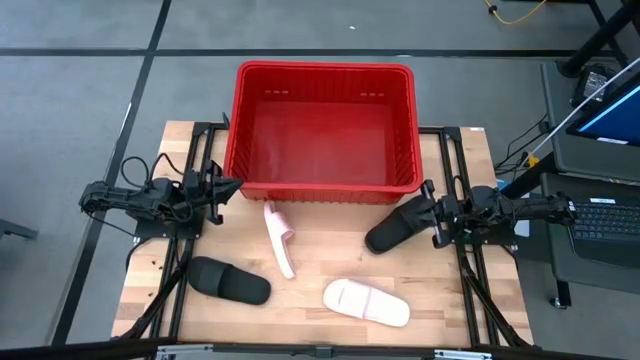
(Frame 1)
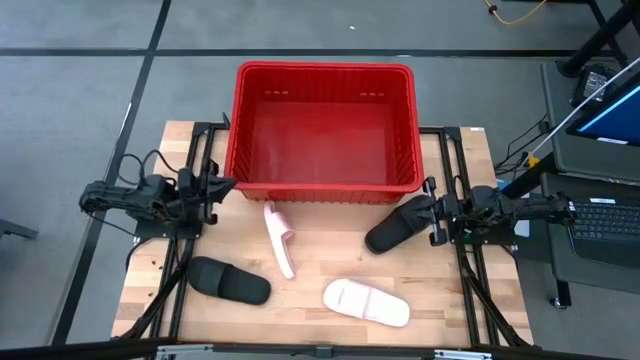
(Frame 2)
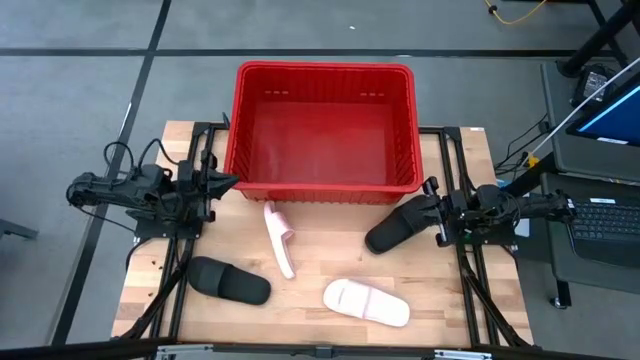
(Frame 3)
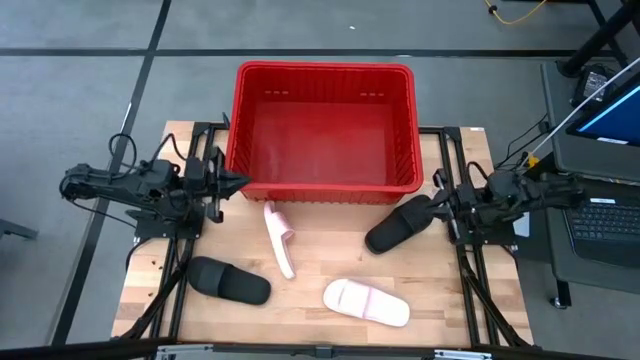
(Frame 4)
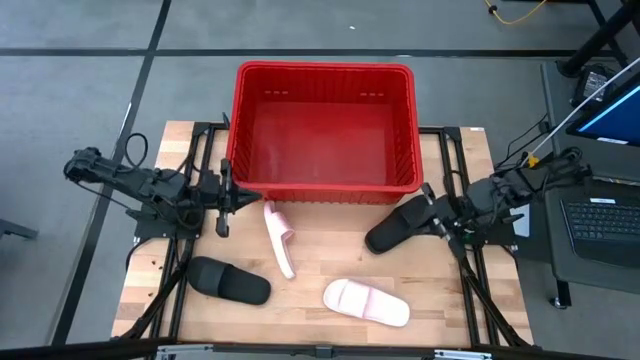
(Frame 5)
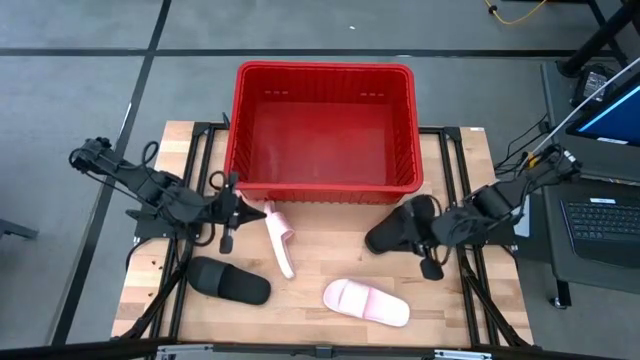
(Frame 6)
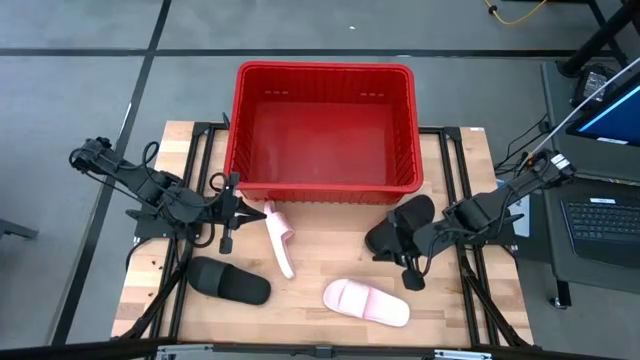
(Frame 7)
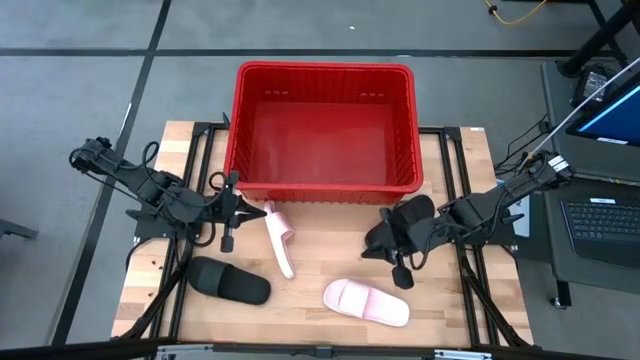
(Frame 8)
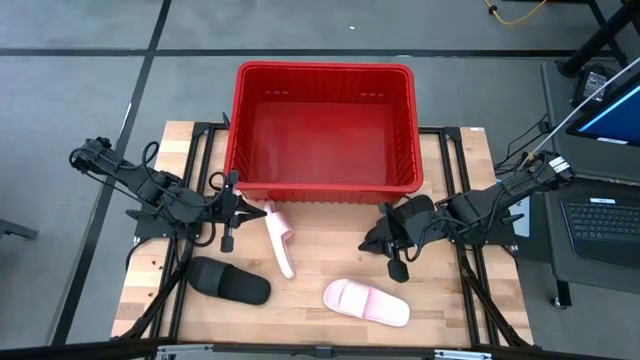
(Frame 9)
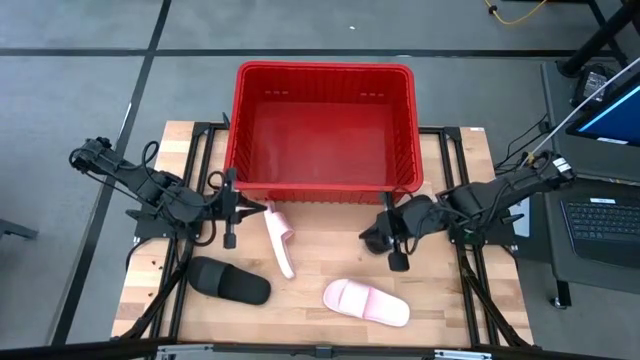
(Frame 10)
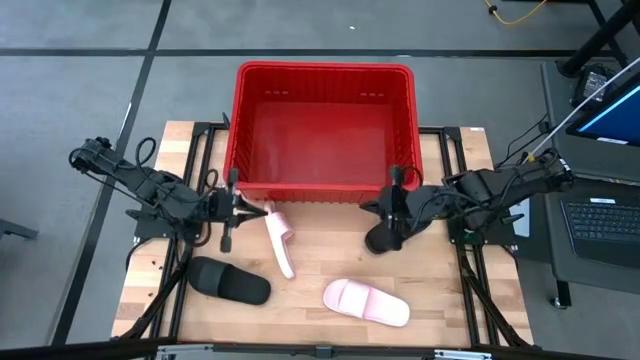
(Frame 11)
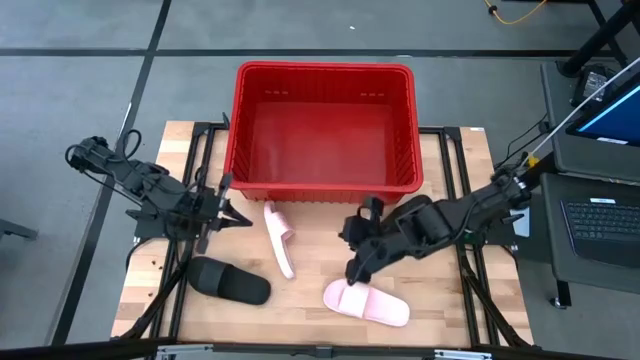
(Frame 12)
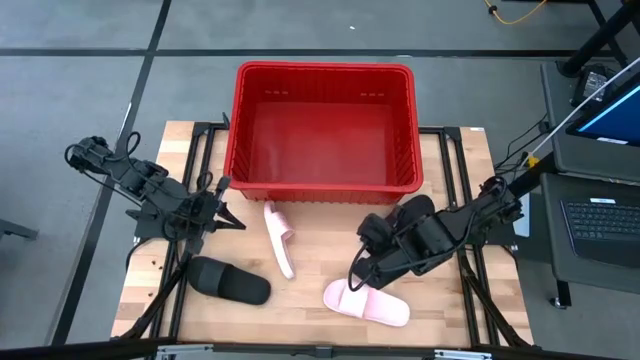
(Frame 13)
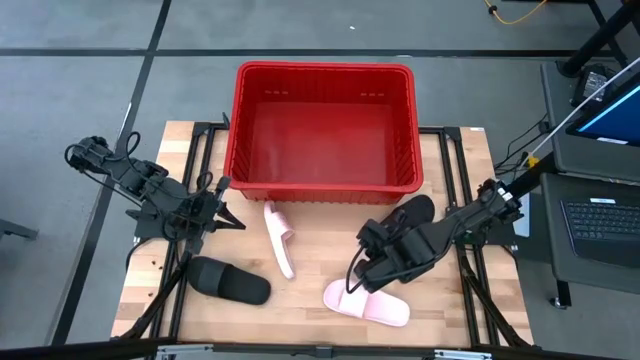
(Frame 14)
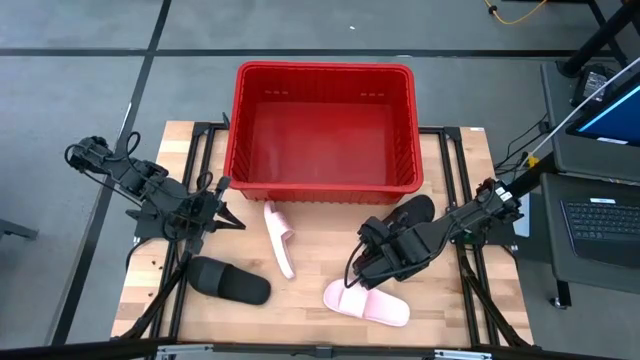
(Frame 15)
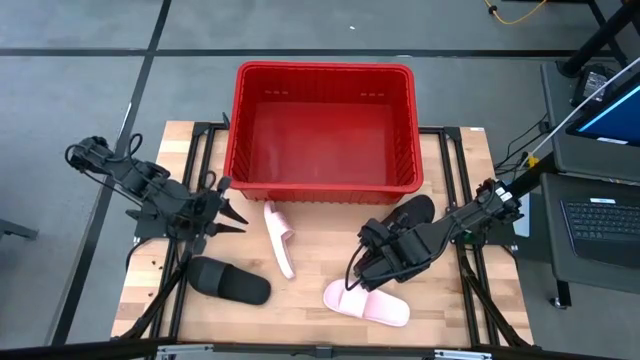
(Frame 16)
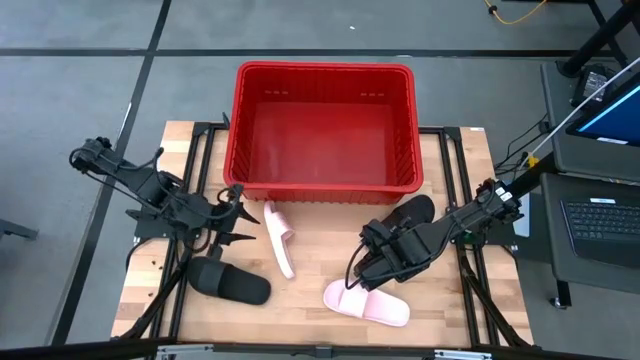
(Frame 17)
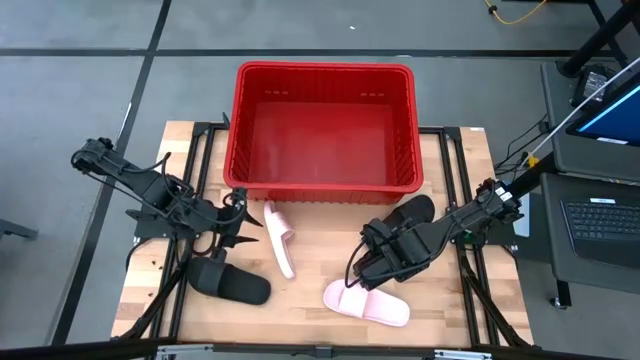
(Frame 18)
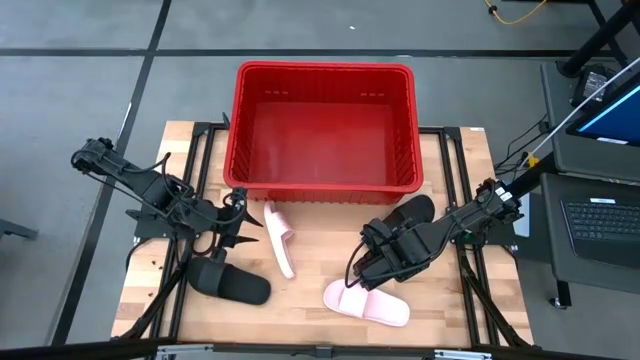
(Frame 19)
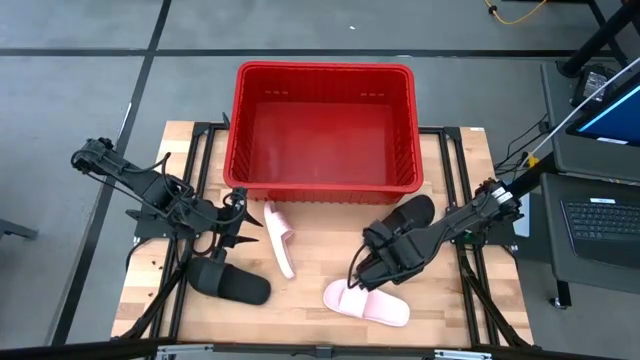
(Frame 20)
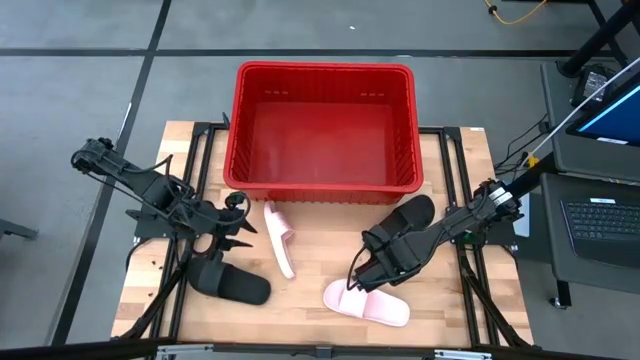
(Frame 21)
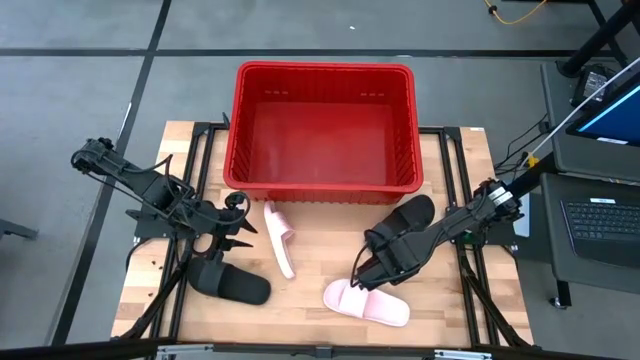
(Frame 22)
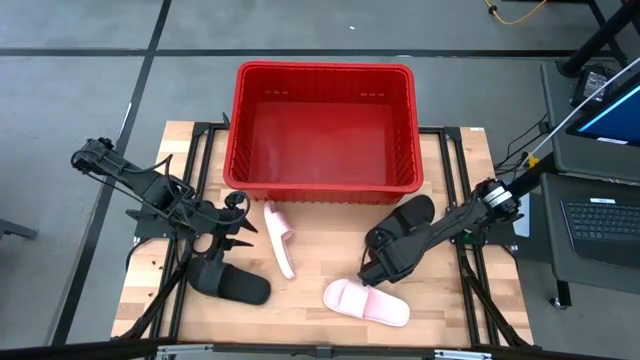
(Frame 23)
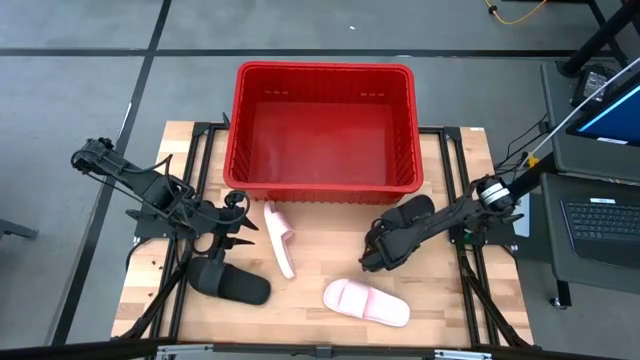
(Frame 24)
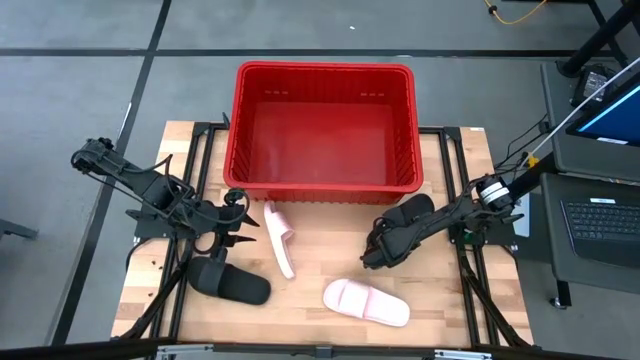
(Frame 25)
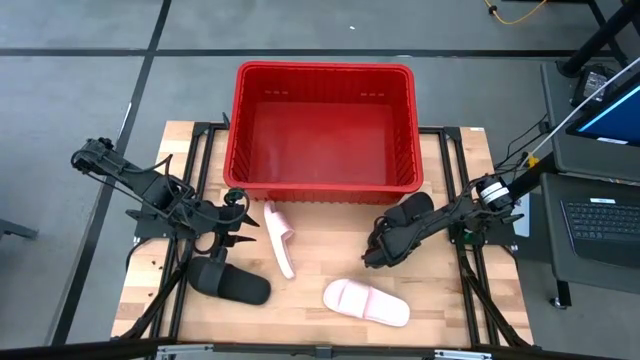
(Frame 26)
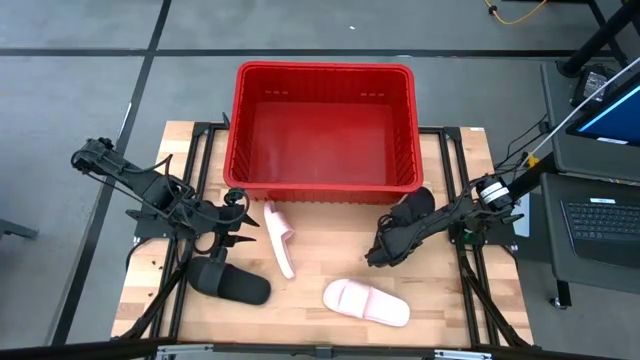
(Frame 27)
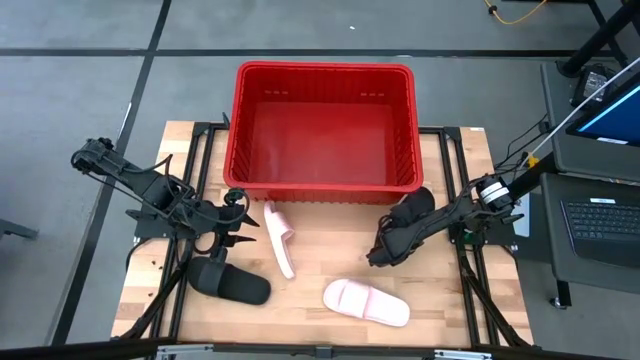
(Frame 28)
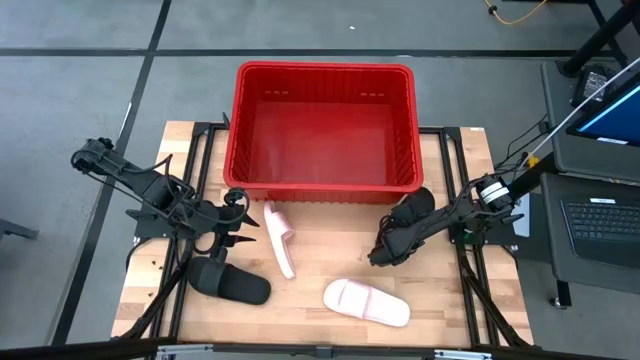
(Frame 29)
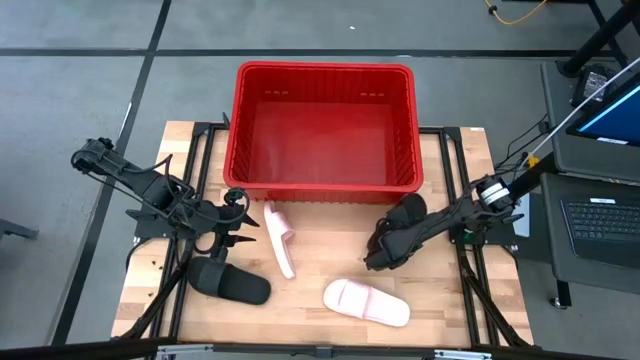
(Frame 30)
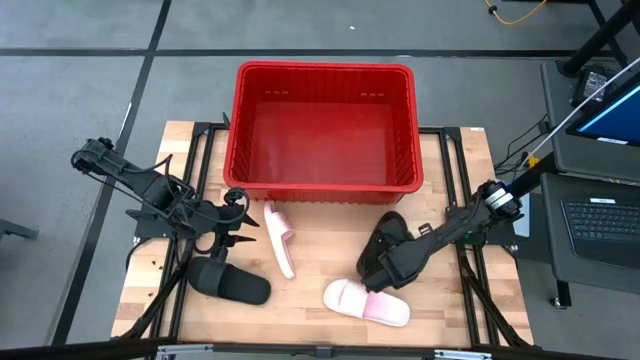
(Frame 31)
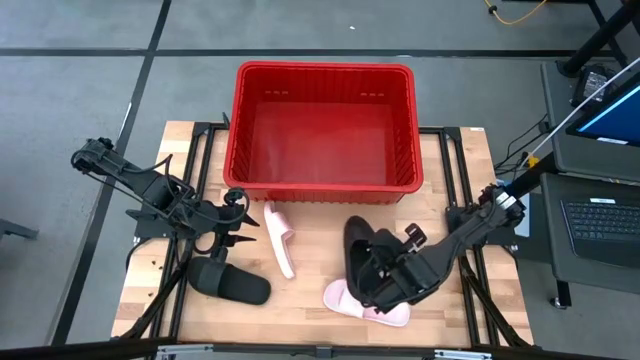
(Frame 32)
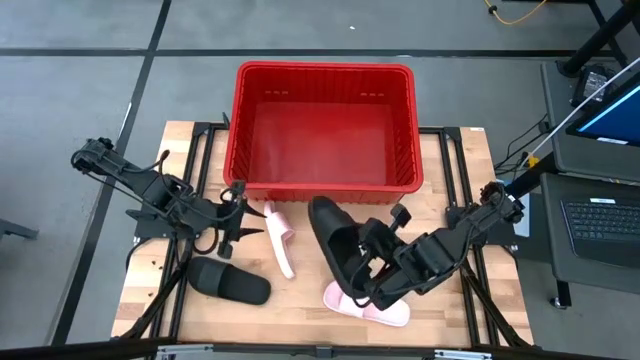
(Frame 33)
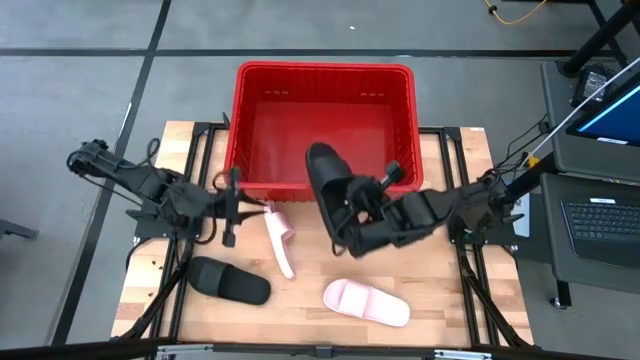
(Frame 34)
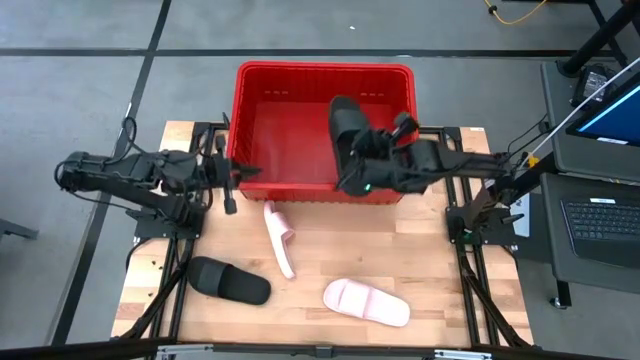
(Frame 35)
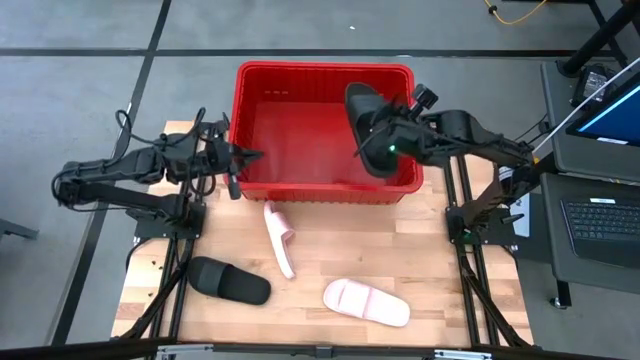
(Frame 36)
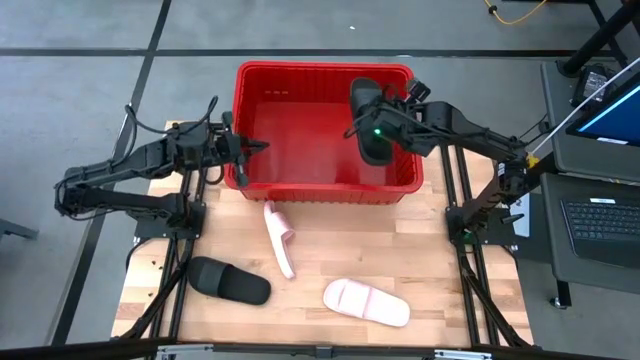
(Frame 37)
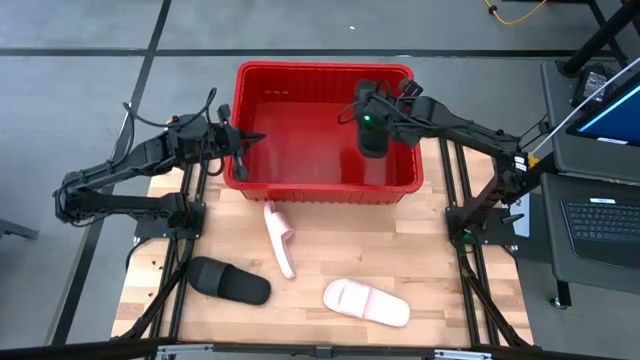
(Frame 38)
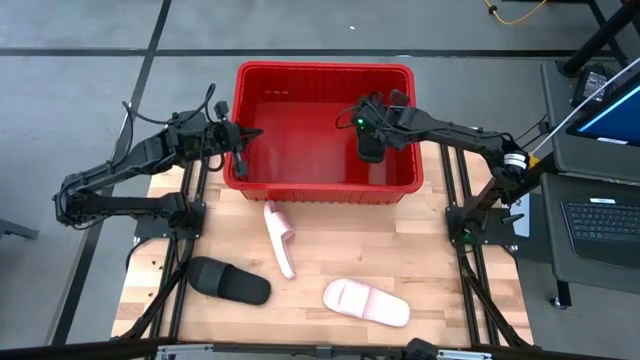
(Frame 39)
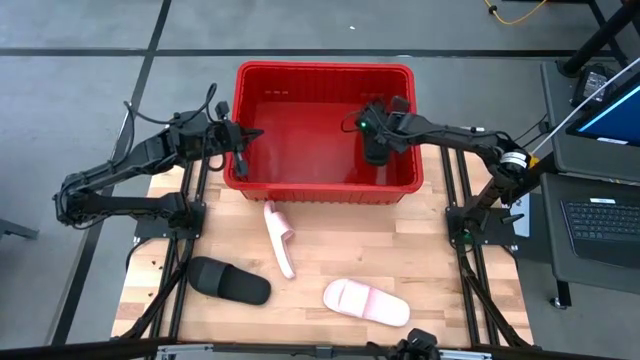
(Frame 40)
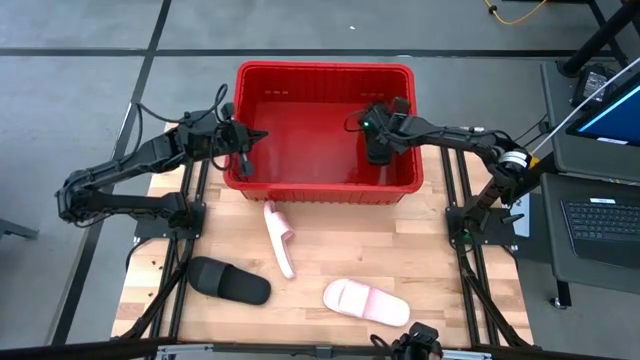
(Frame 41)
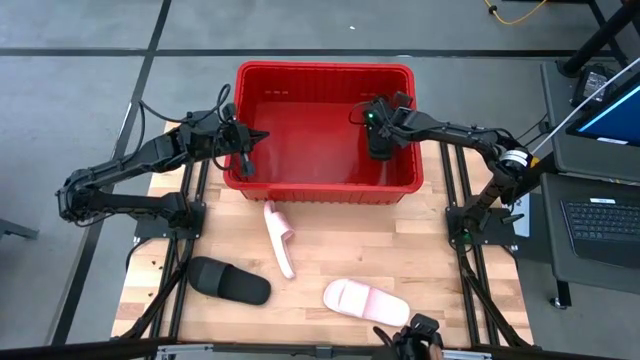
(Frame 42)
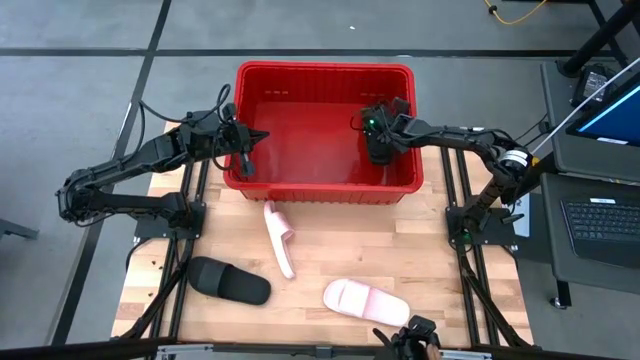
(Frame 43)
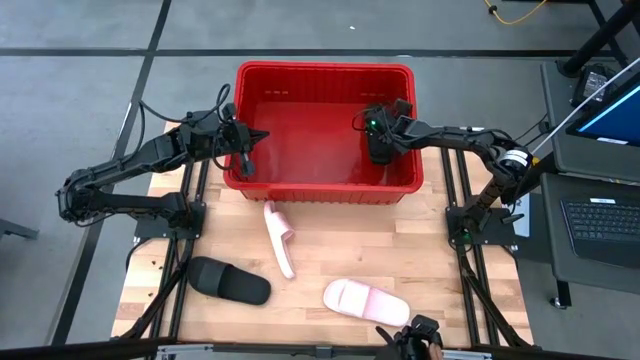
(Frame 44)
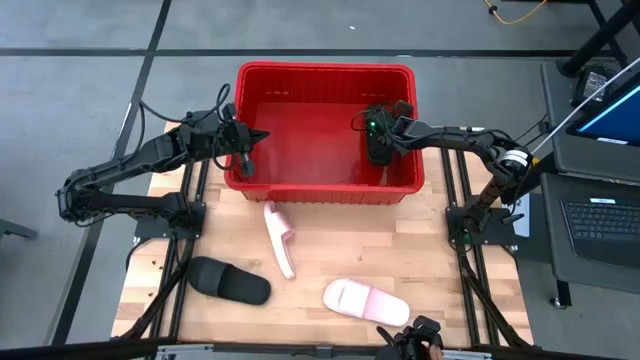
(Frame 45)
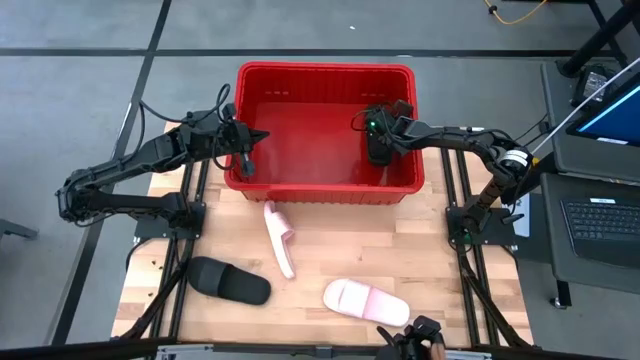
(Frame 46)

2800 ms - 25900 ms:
Task: Pick and place slides into bin
Put the right black slide into the red bin
